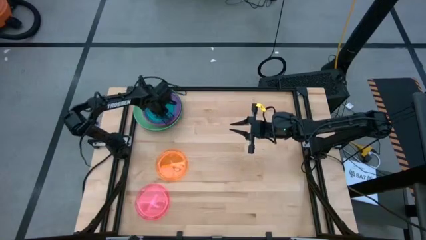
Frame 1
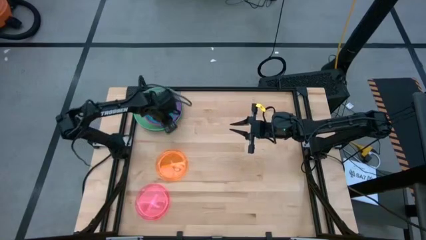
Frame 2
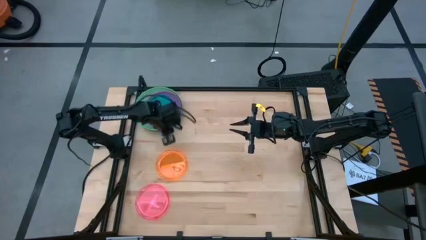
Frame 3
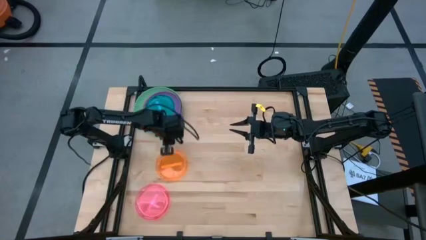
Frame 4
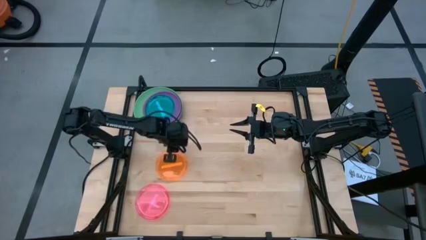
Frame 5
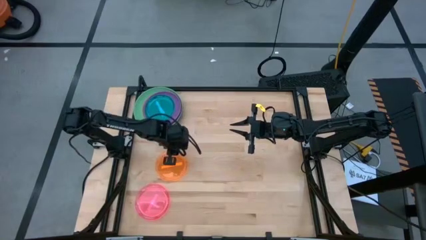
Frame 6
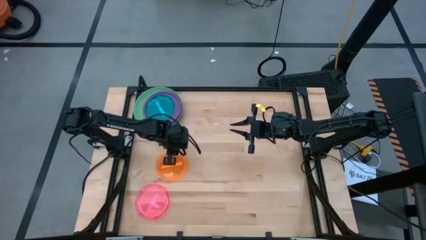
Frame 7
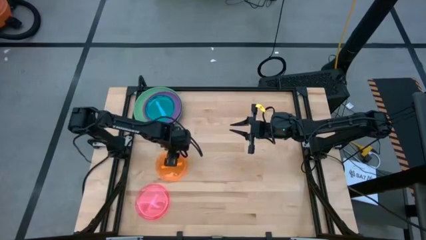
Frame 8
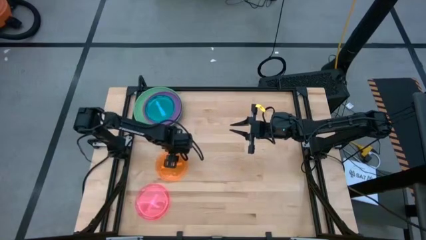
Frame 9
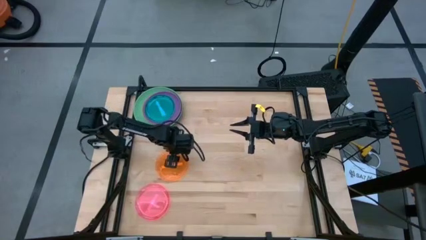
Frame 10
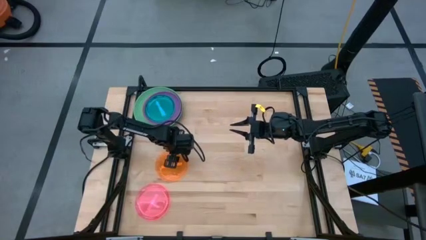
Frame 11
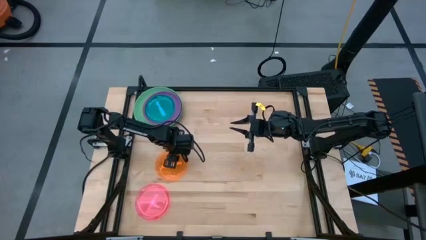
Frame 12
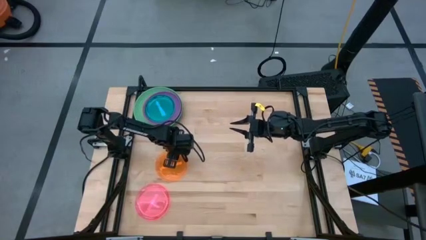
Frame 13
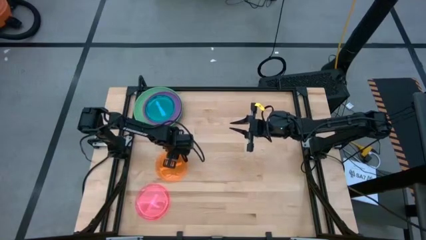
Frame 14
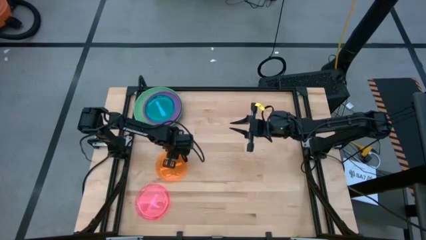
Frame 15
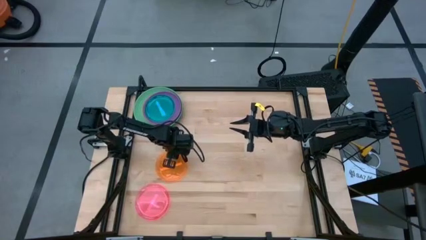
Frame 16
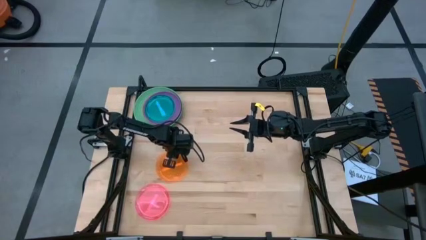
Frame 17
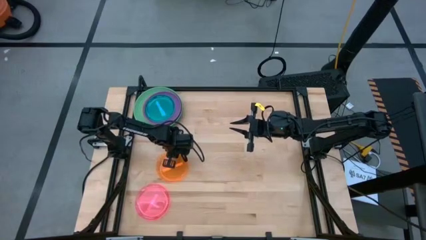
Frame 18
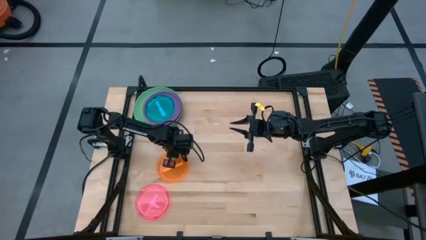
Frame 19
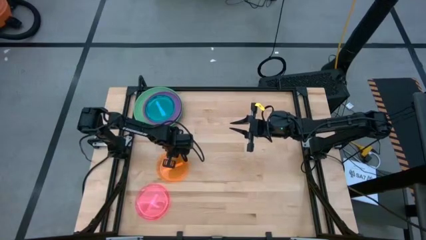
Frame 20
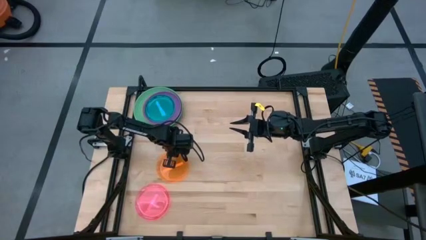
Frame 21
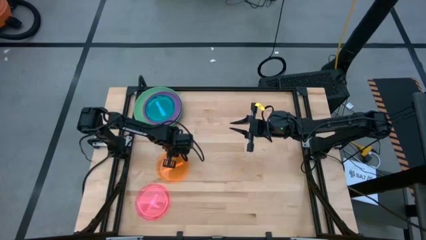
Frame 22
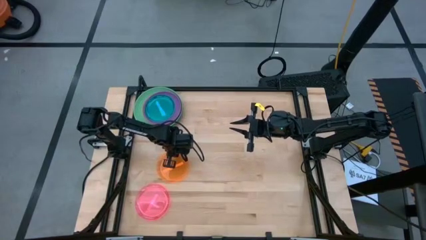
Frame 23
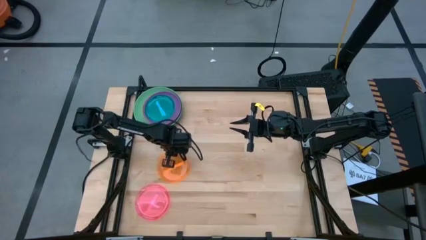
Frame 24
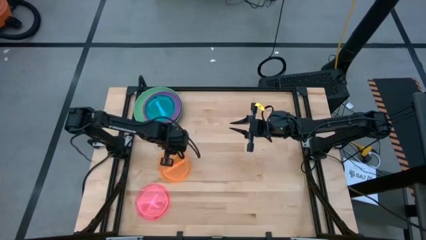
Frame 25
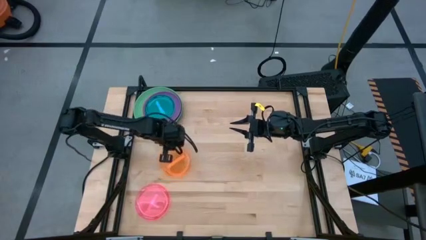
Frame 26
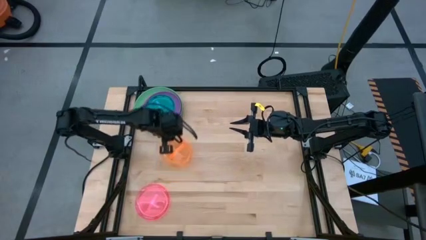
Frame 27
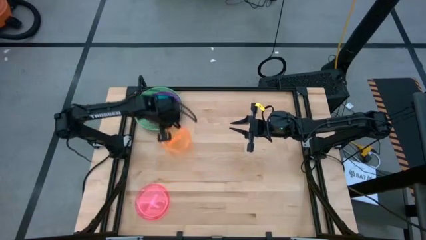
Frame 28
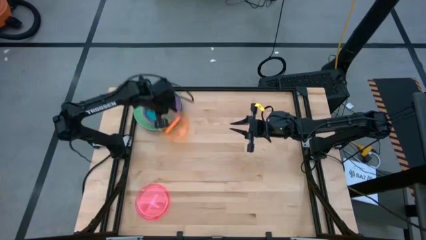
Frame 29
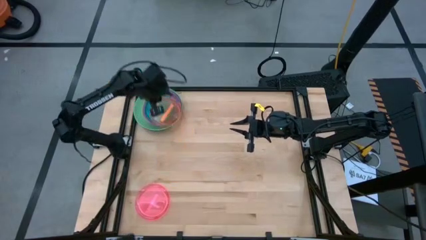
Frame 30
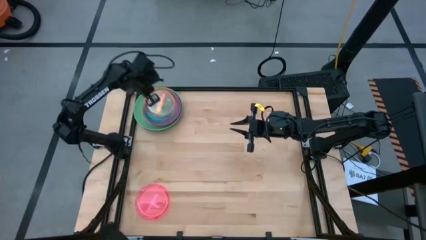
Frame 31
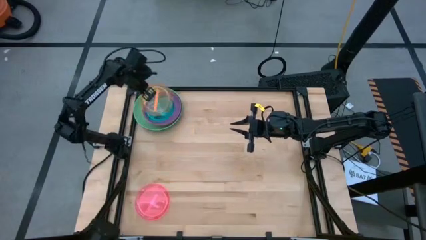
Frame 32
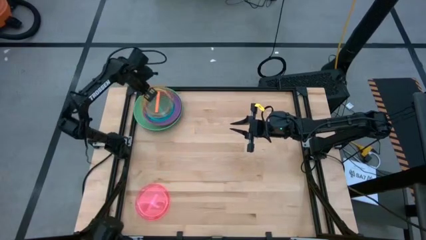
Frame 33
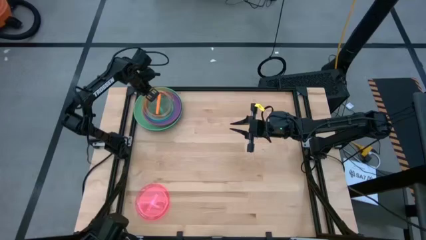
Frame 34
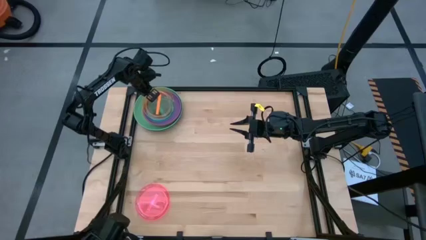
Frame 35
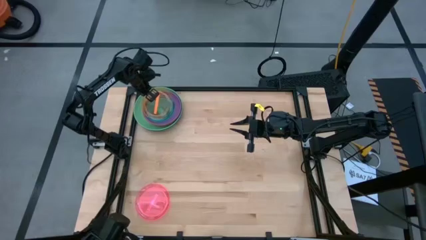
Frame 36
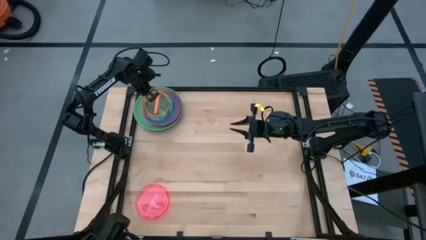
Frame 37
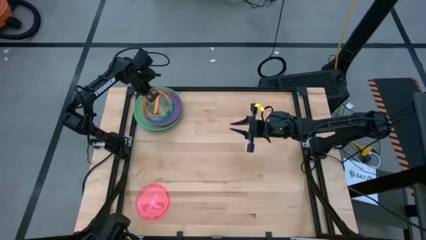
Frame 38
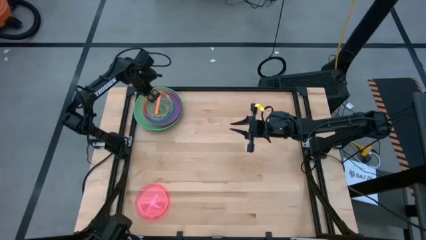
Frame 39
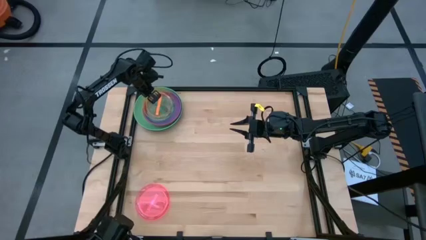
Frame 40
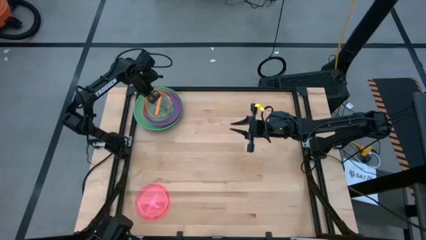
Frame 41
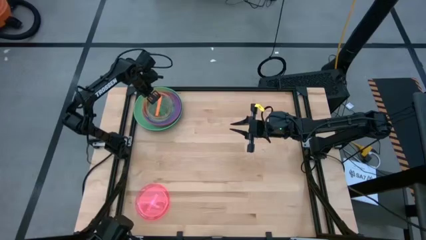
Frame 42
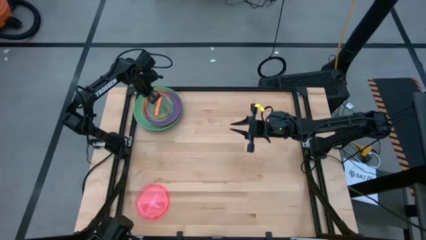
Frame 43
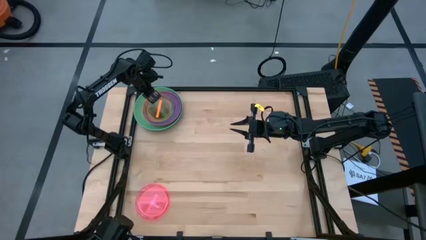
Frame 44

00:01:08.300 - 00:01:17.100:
Task: Stack plastic plates
Stack the transparent orange plate on top of the the transparent blue plate

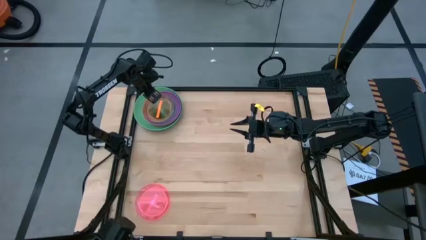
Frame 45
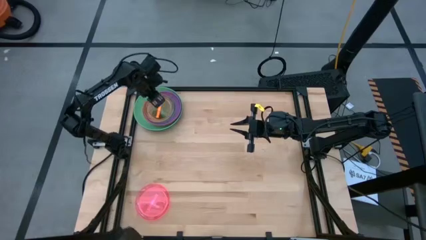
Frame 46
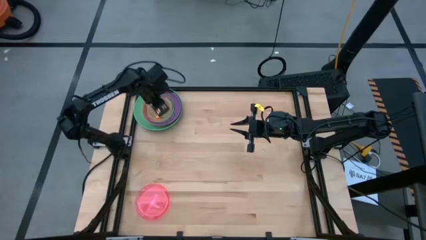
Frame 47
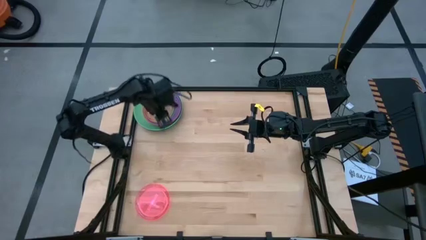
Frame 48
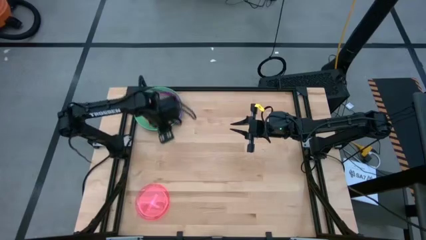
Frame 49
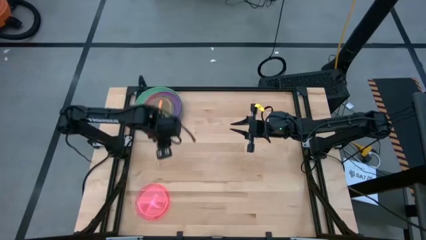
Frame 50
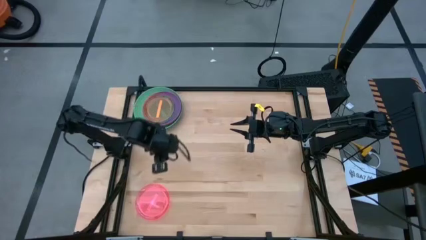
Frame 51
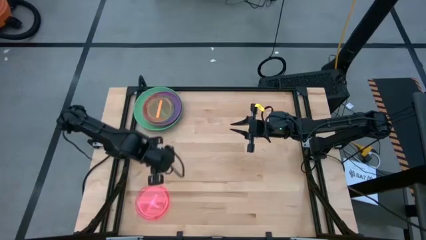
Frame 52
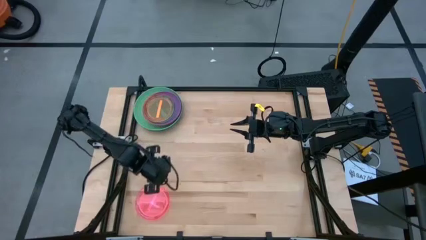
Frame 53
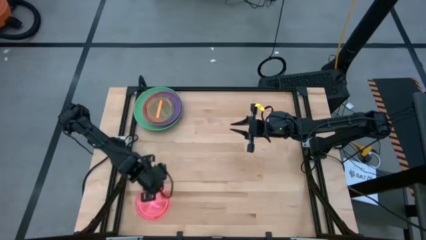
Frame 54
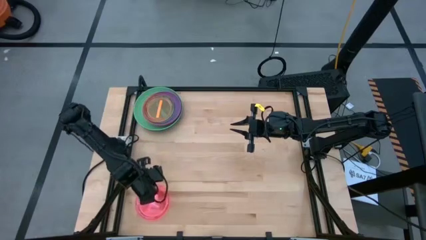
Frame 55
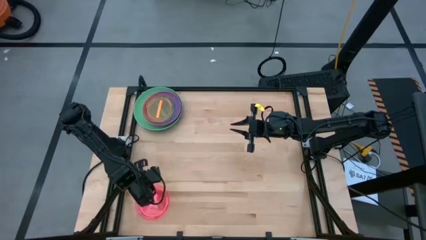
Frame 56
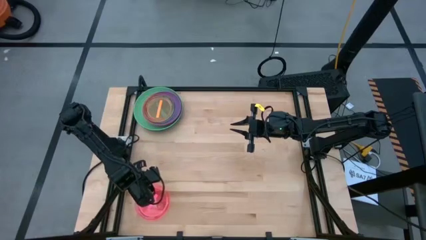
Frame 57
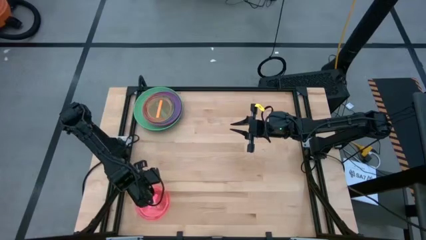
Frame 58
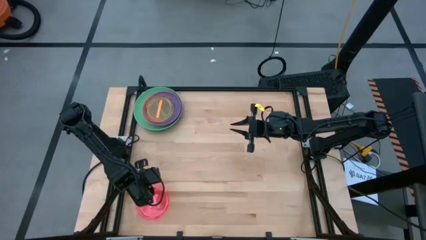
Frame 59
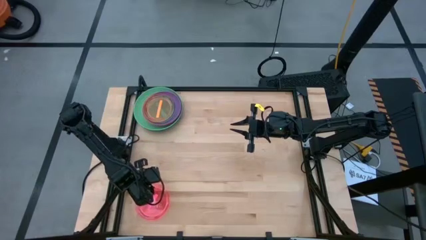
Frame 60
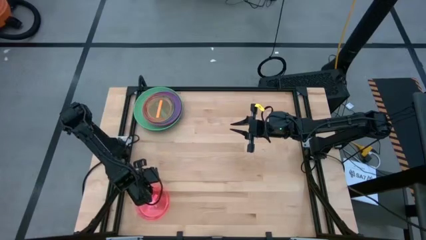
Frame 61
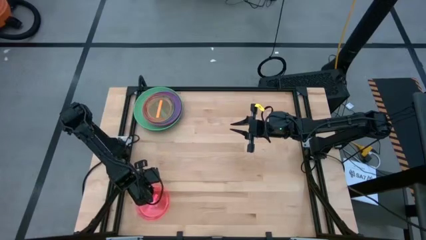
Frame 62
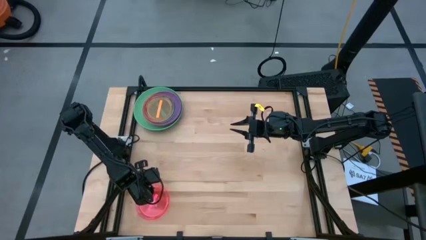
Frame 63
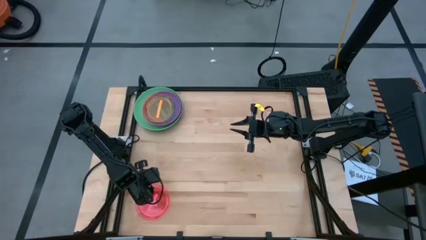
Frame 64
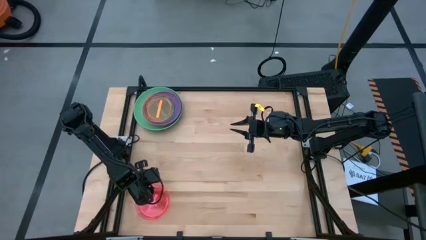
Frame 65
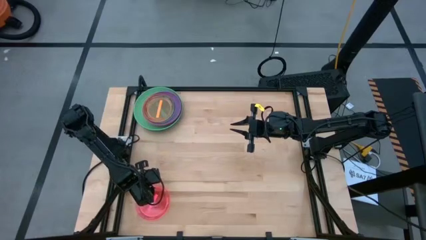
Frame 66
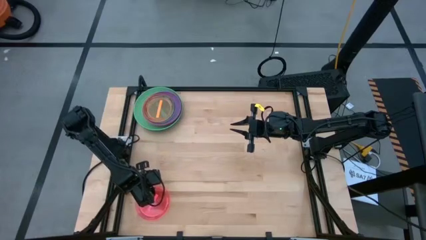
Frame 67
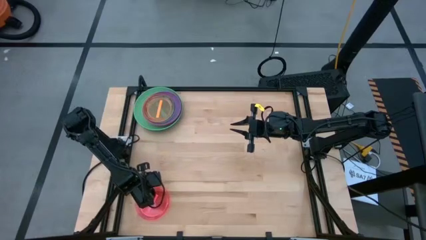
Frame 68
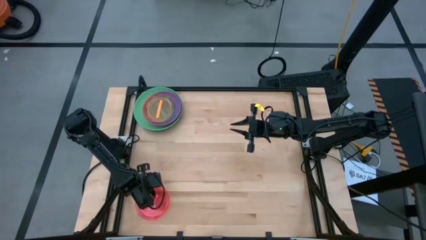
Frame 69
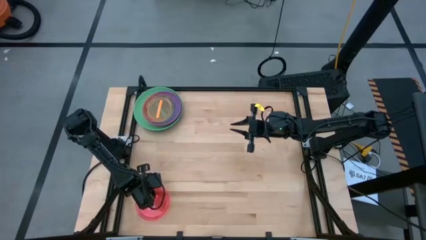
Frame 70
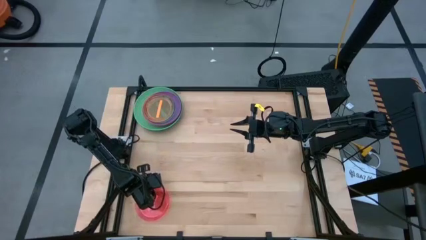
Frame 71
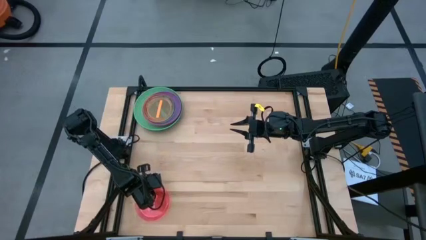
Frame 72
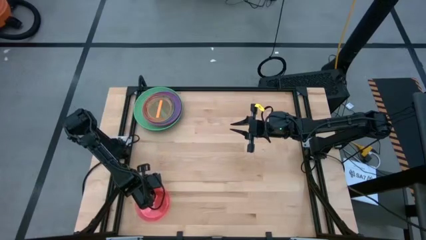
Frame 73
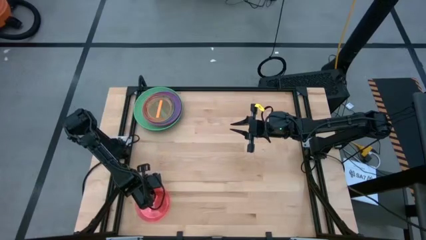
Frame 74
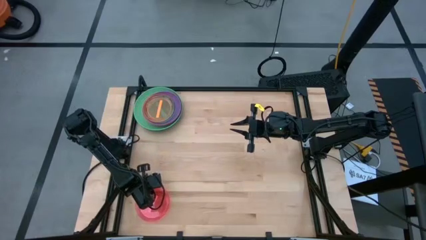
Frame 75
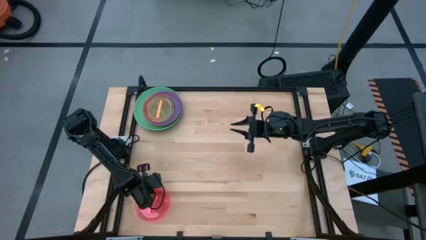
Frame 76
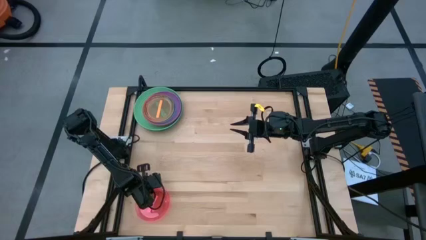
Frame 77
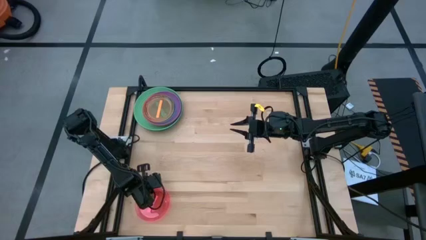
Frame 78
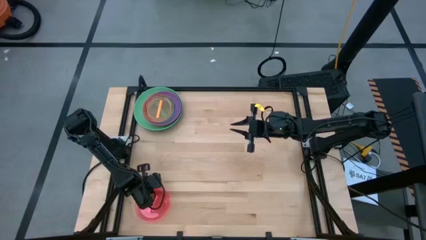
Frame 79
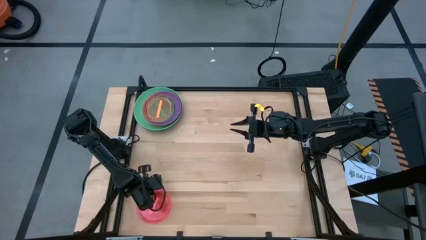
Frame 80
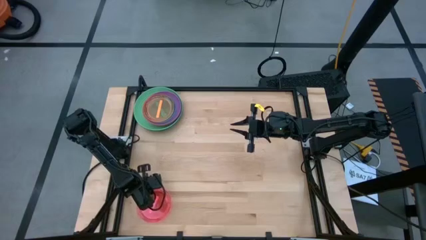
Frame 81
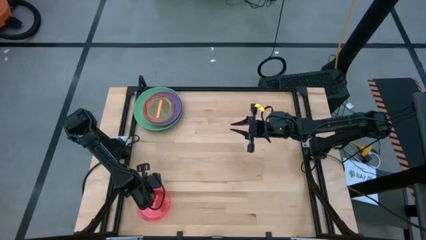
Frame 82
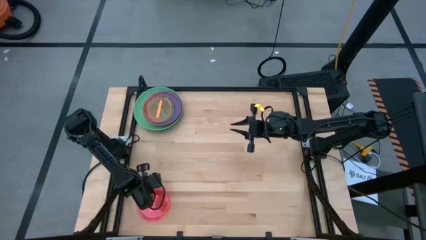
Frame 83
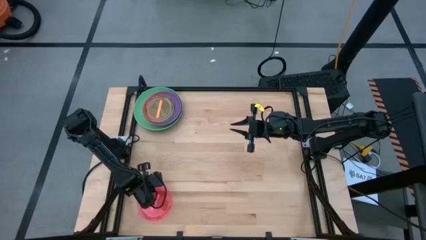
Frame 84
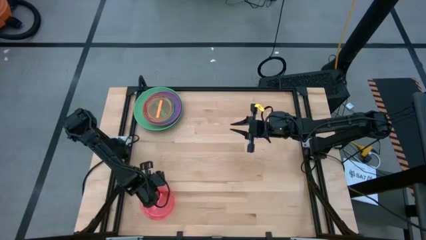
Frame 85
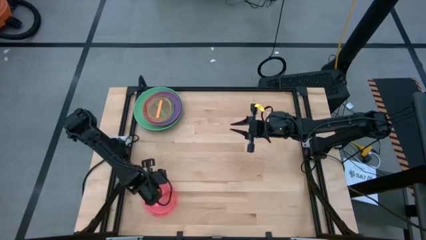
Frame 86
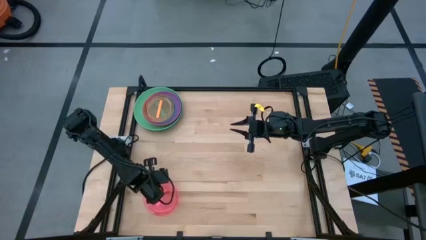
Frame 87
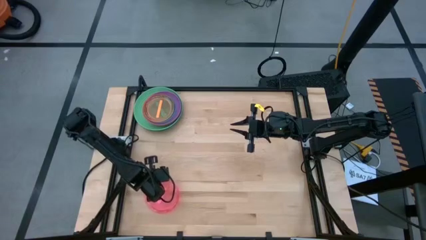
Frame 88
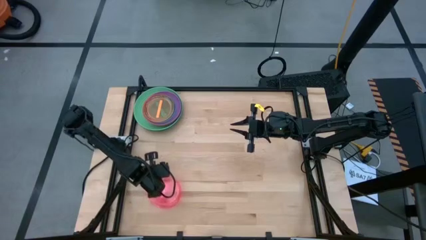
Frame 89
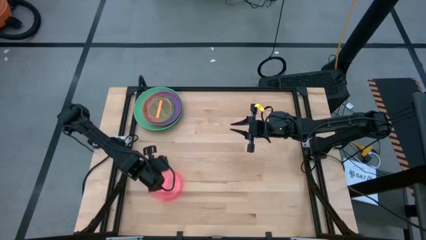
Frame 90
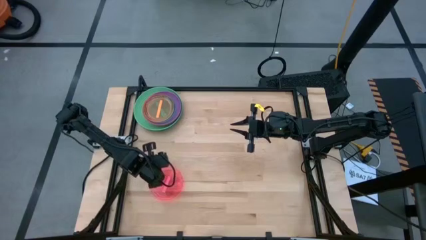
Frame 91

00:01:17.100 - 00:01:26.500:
Stack the transparent pink plate on top of the transparent orange plate
